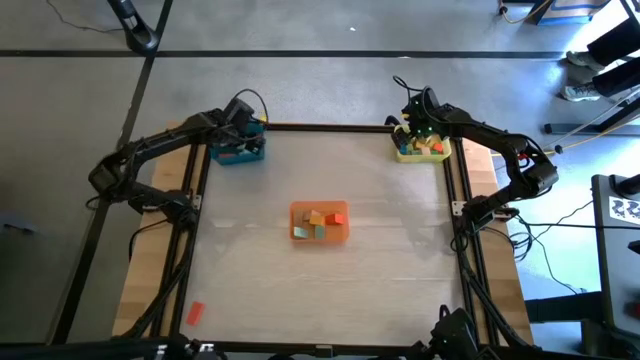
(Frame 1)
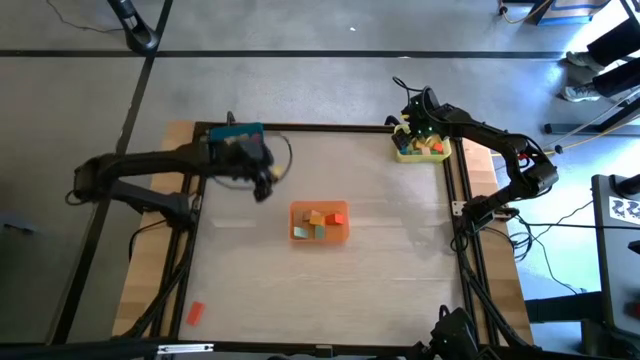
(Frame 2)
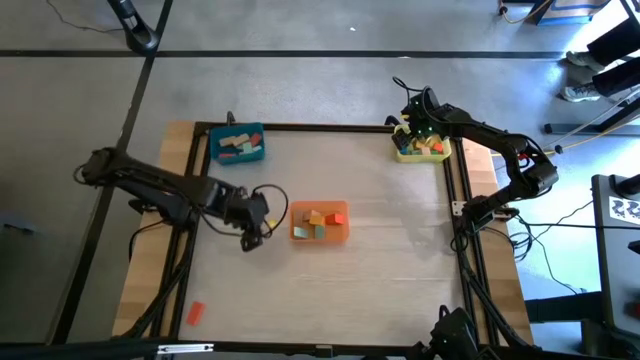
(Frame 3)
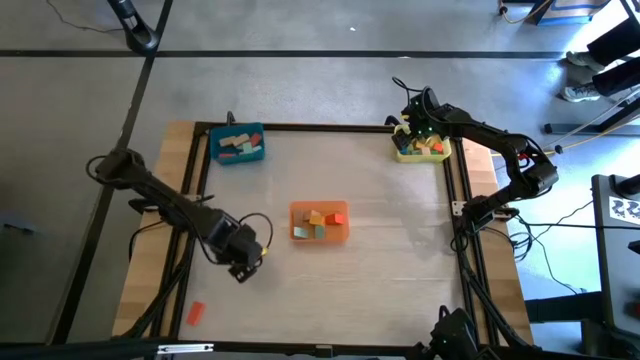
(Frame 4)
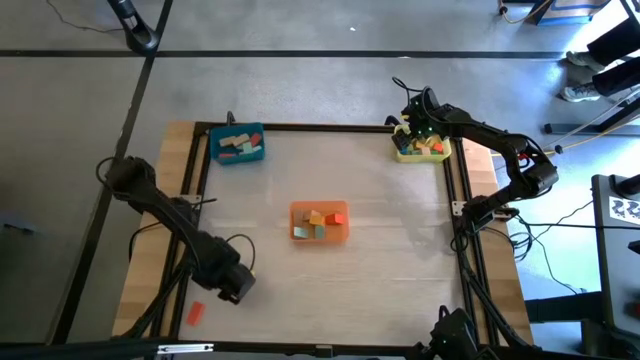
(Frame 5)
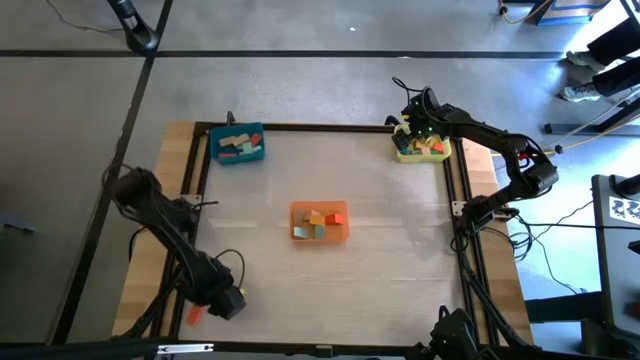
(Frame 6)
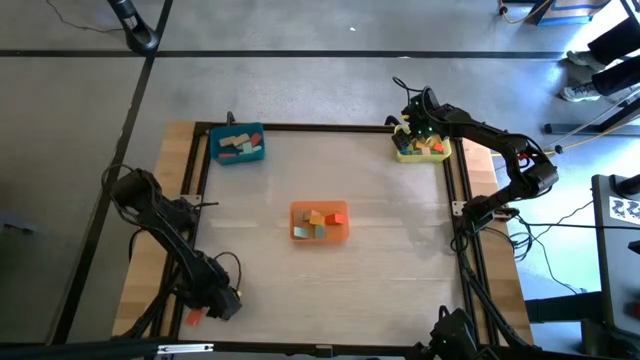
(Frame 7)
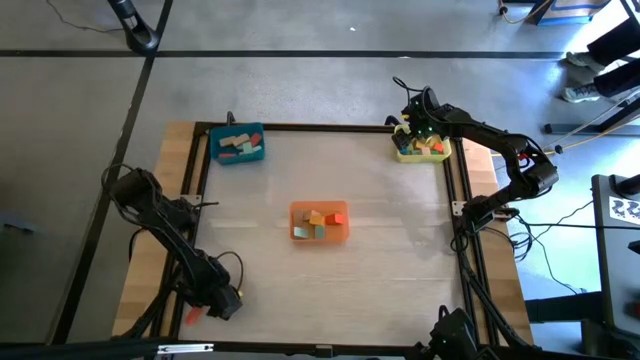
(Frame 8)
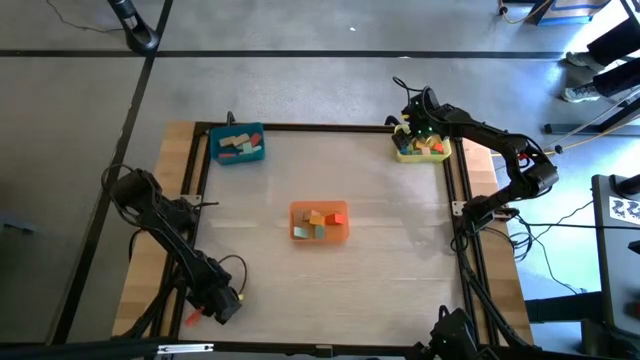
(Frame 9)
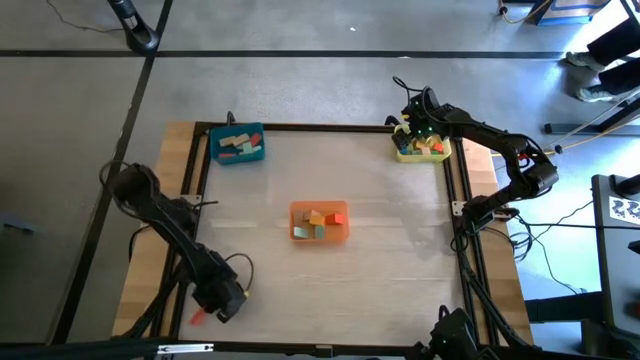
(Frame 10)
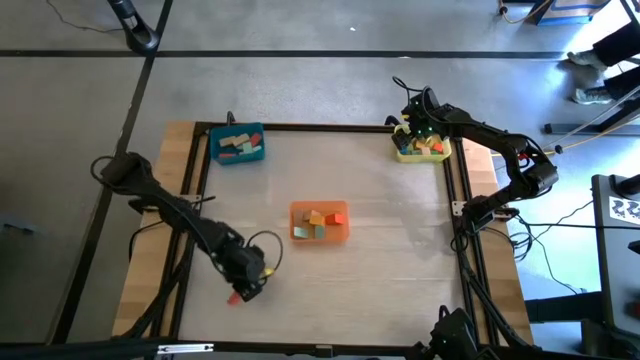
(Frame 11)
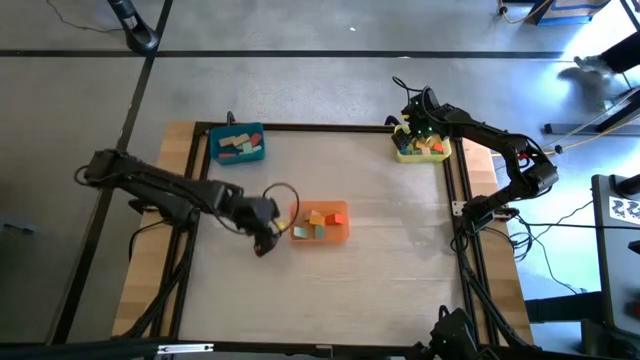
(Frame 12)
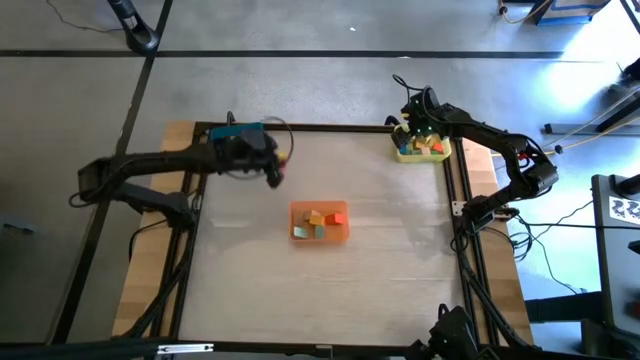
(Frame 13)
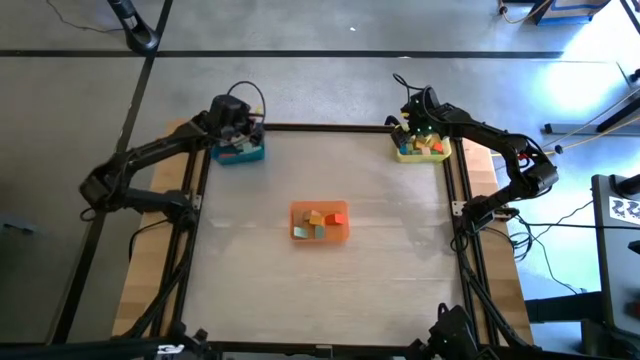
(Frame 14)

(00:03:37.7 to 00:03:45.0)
Task: Sort blocks by size
Put the orange rectangular block into the blue bin

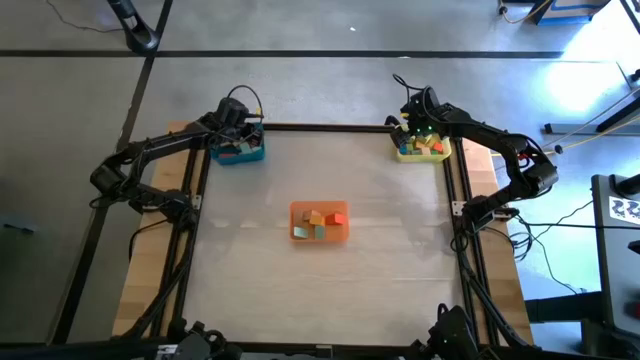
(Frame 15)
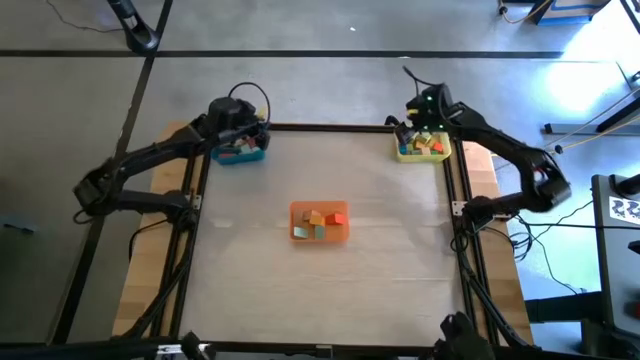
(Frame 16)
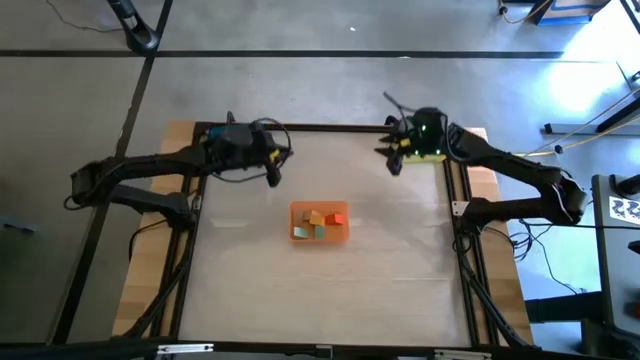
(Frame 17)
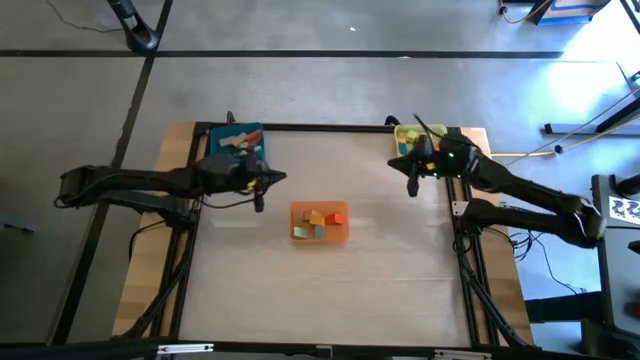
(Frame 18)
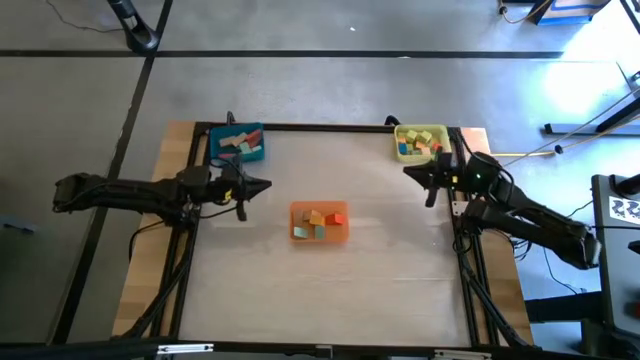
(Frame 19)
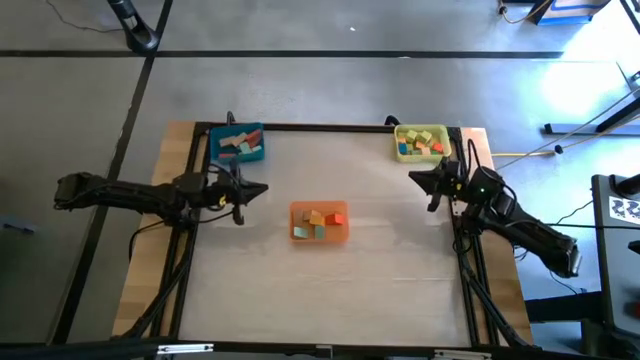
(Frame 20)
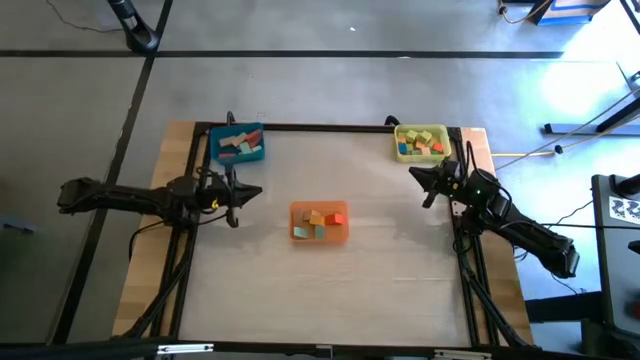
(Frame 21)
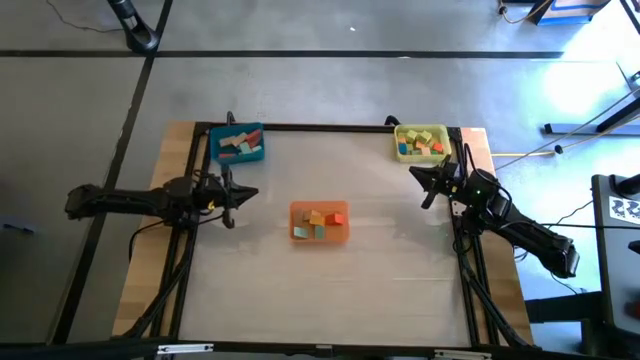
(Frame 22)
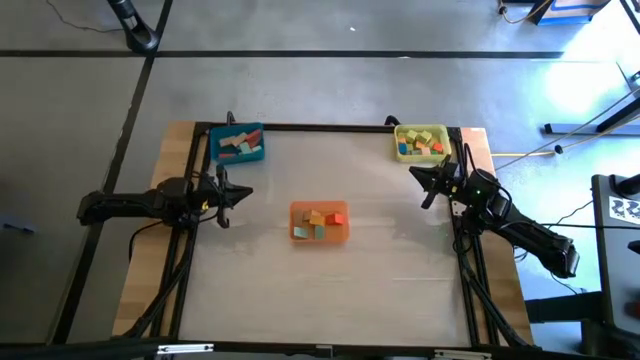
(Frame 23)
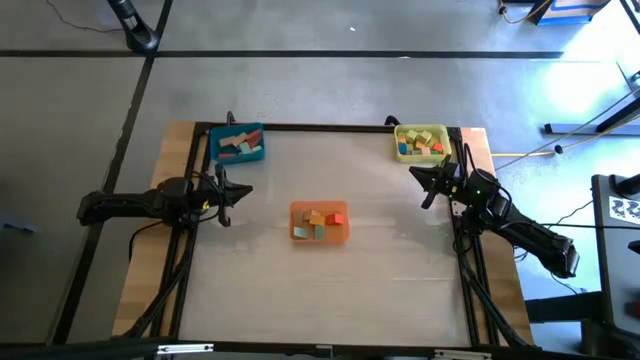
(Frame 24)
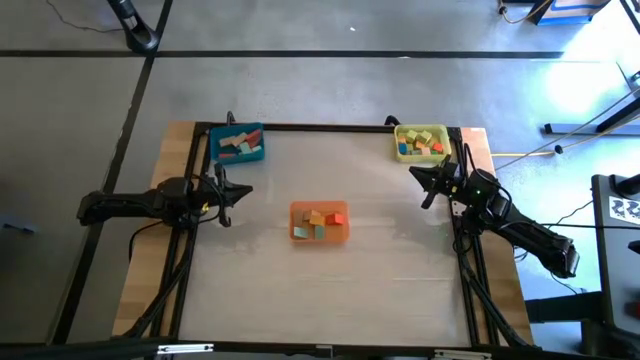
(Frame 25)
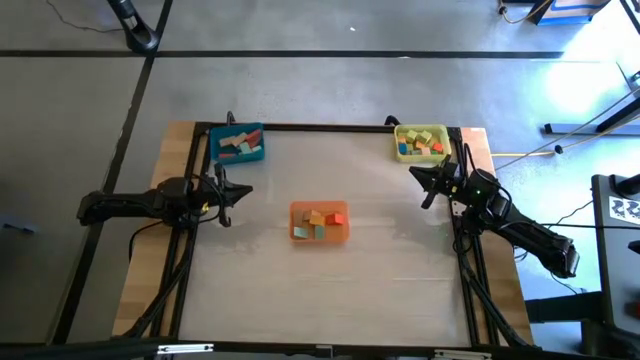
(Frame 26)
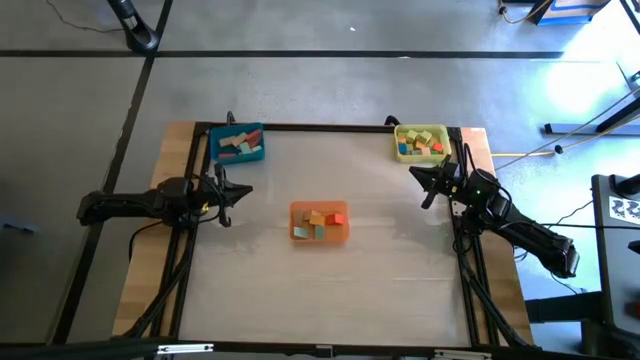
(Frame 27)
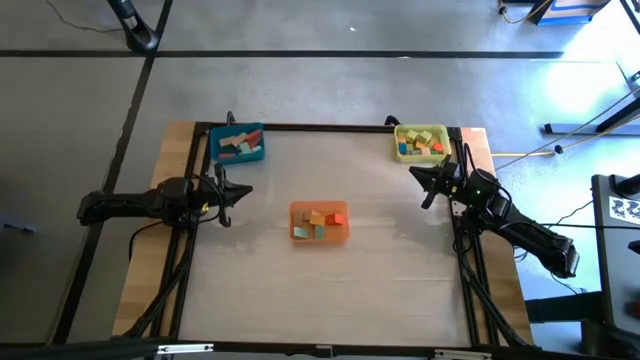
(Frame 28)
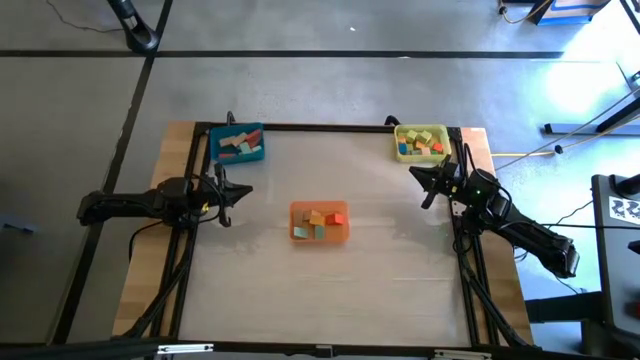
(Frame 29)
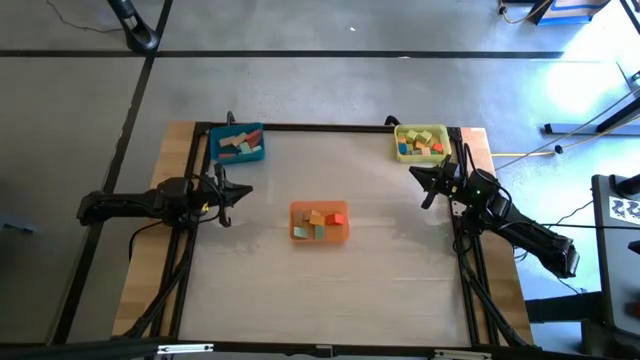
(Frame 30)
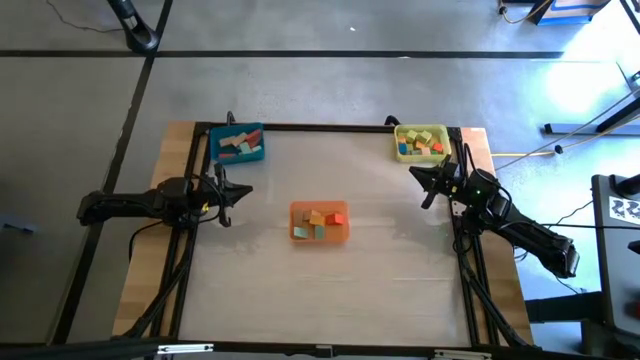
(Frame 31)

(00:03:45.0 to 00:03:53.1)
Return to Home Position

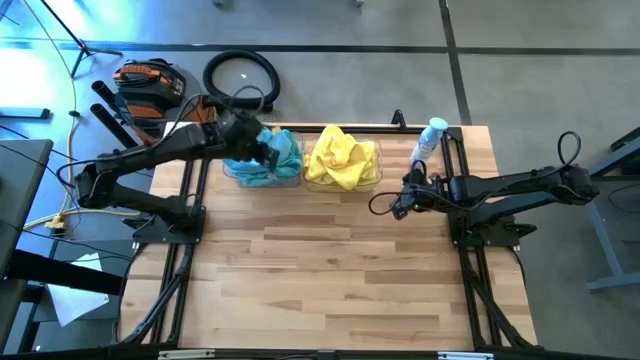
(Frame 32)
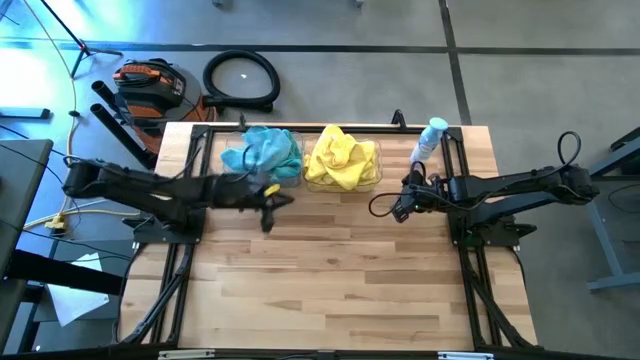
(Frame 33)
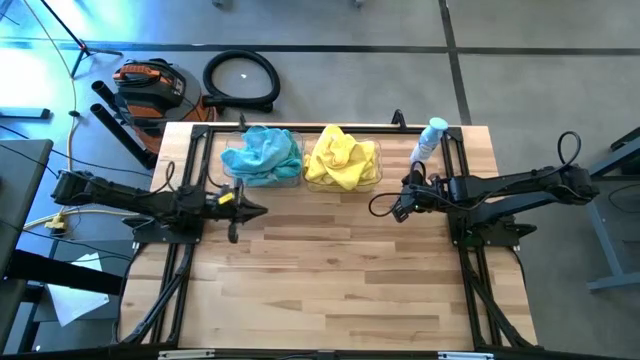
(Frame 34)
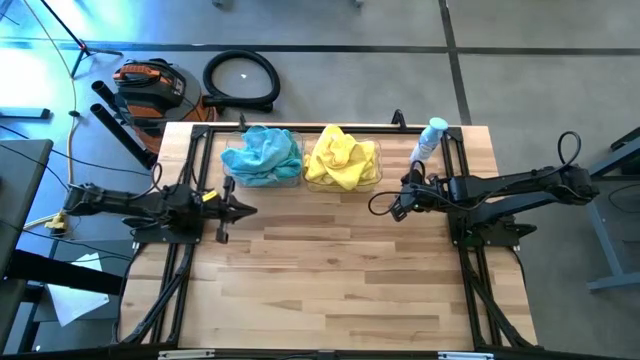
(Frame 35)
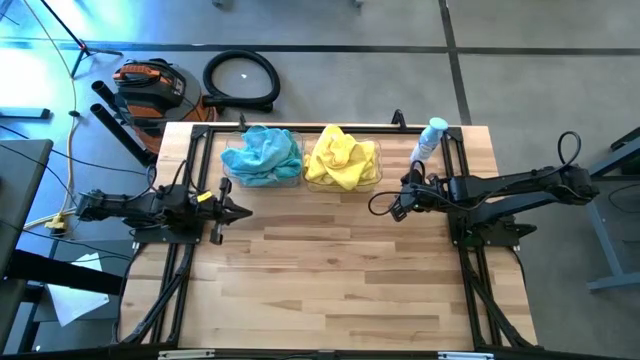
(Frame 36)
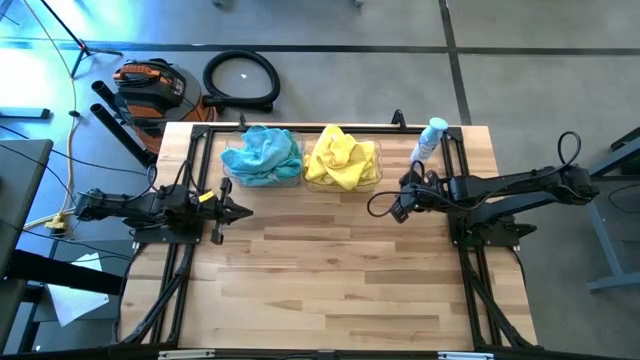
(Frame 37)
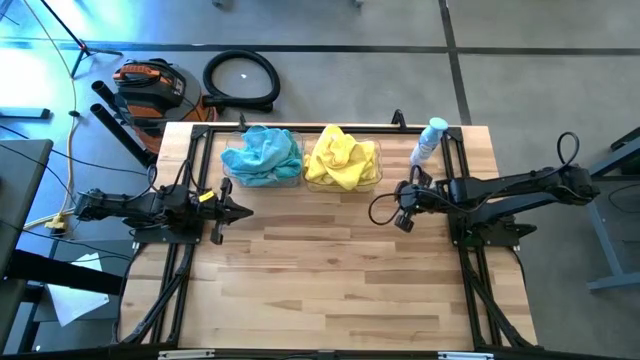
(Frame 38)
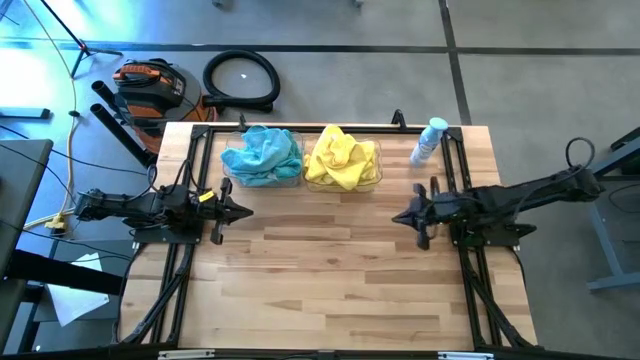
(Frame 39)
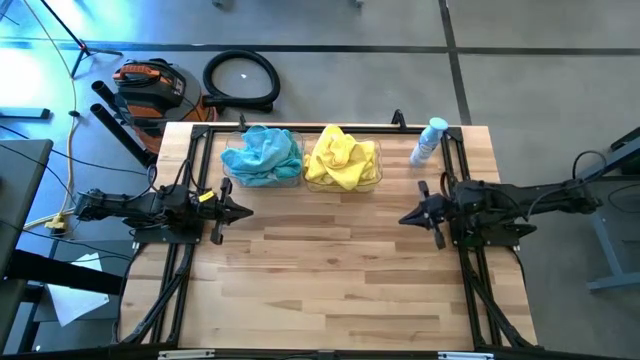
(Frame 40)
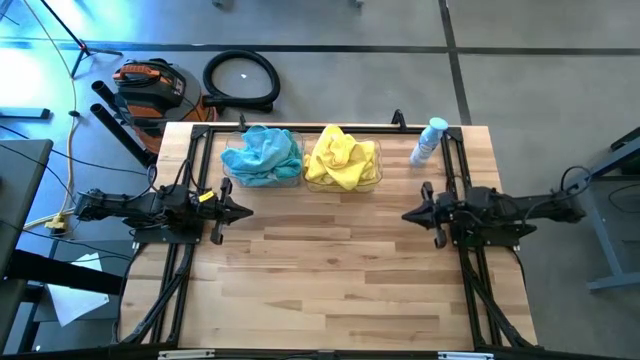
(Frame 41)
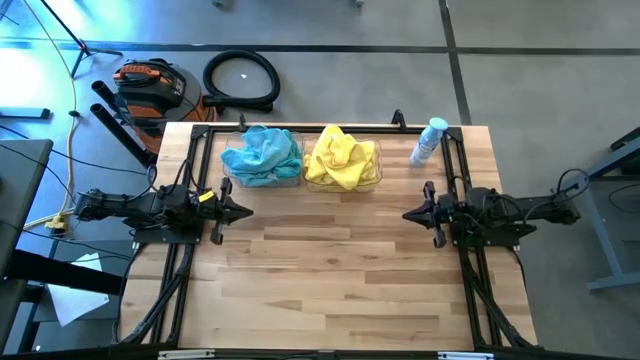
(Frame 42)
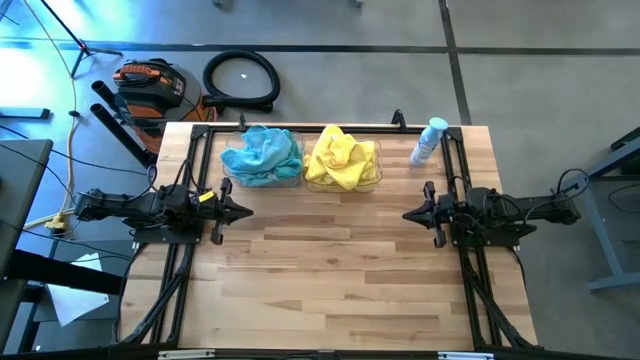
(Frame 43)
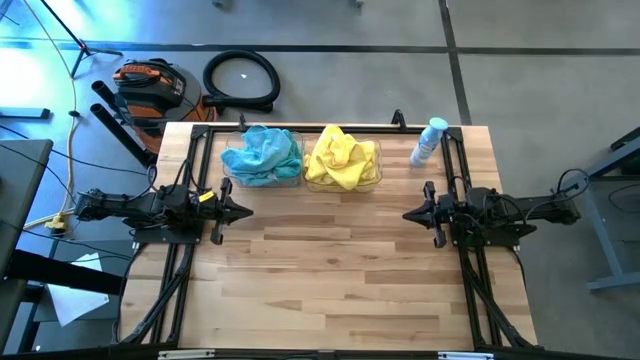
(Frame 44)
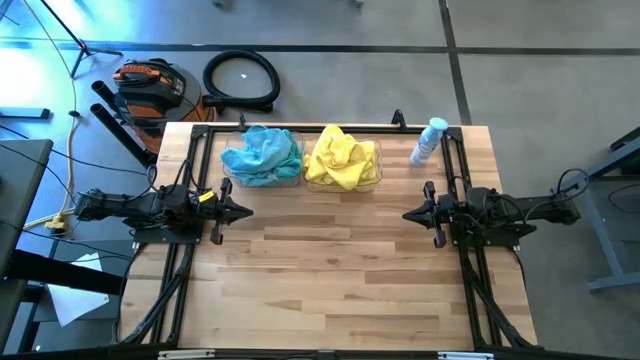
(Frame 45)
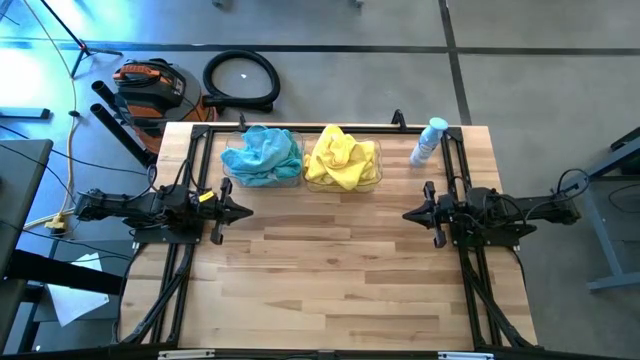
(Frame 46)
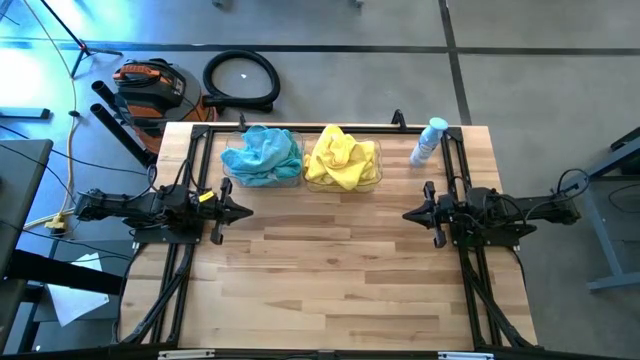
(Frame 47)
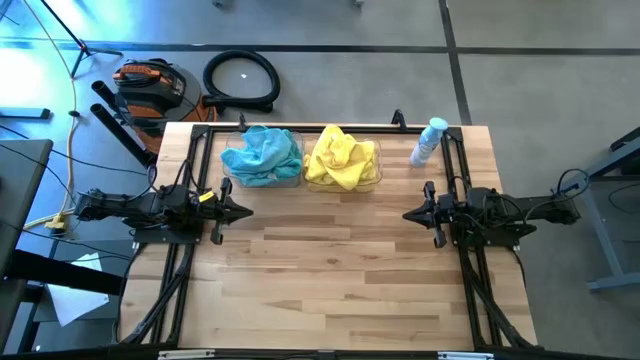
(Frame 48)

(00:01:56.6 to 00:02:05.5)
Task: Sort microfiber towel by color & place in baskets
Return to Home Position
